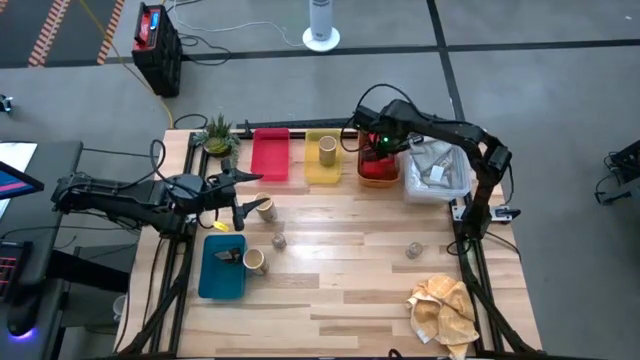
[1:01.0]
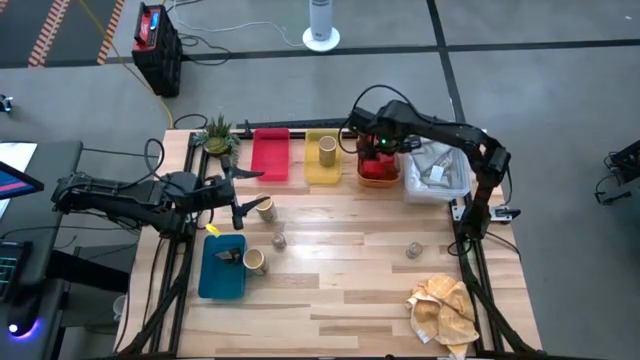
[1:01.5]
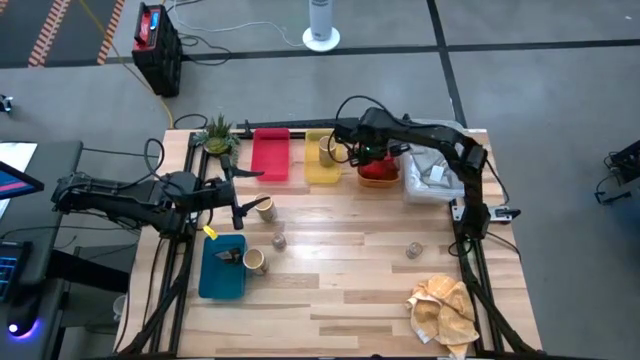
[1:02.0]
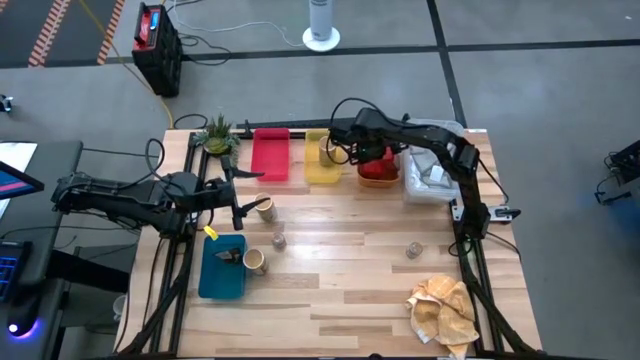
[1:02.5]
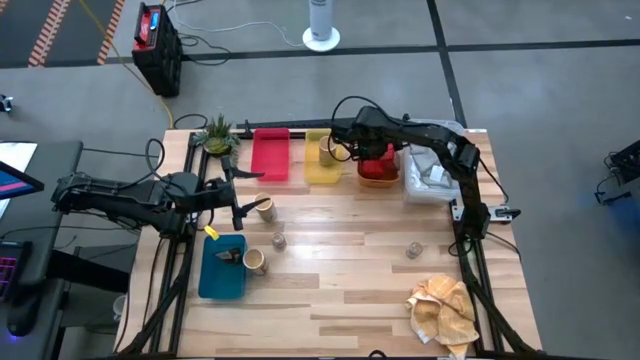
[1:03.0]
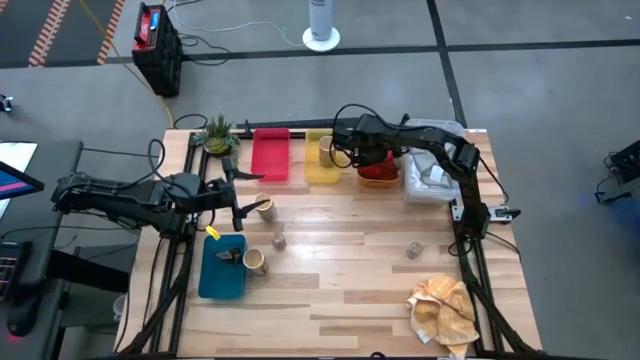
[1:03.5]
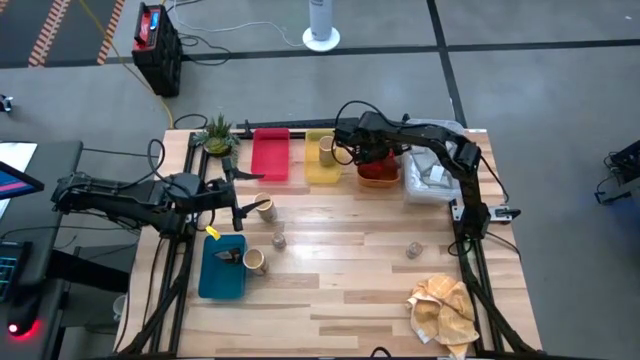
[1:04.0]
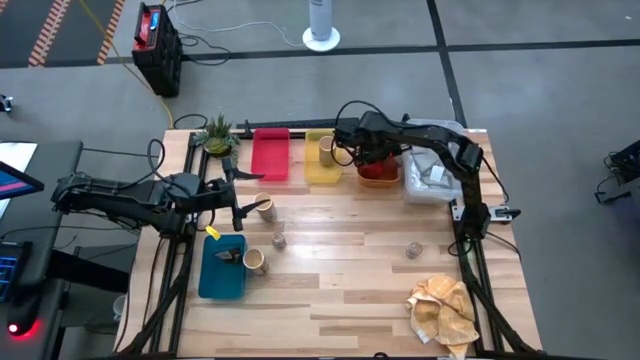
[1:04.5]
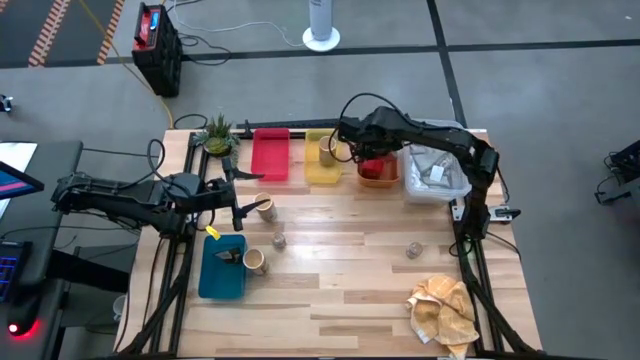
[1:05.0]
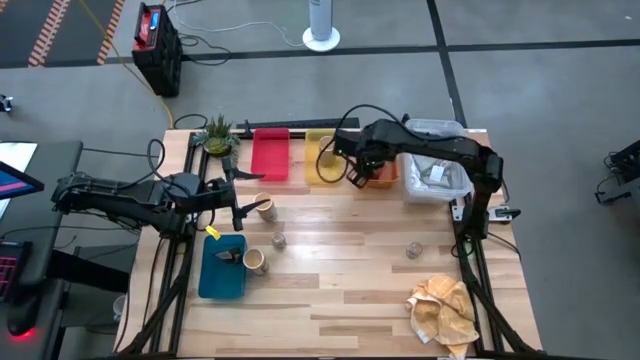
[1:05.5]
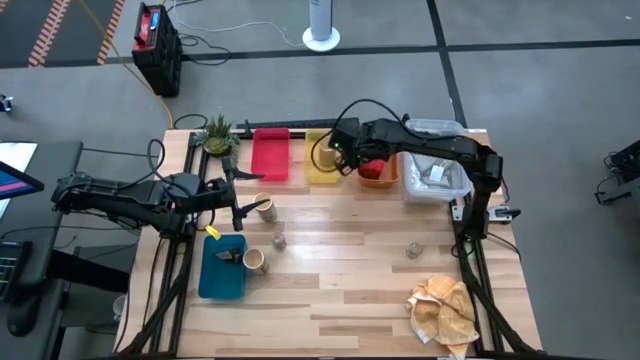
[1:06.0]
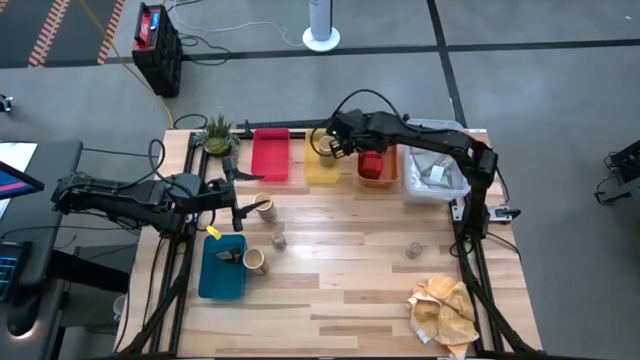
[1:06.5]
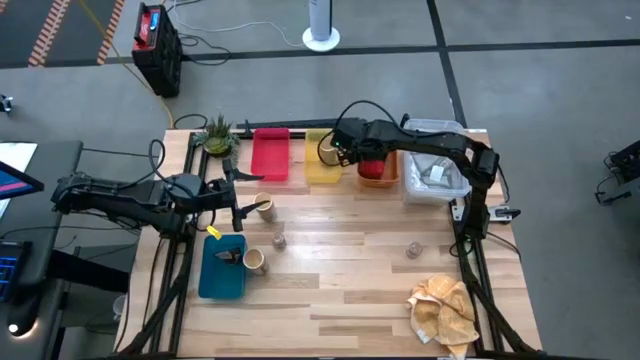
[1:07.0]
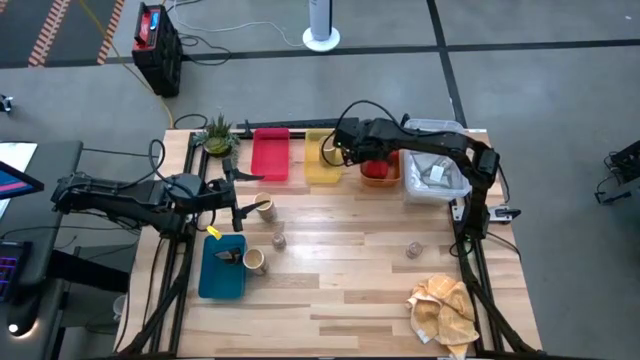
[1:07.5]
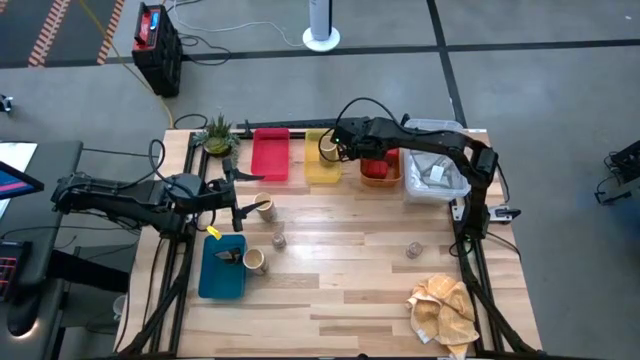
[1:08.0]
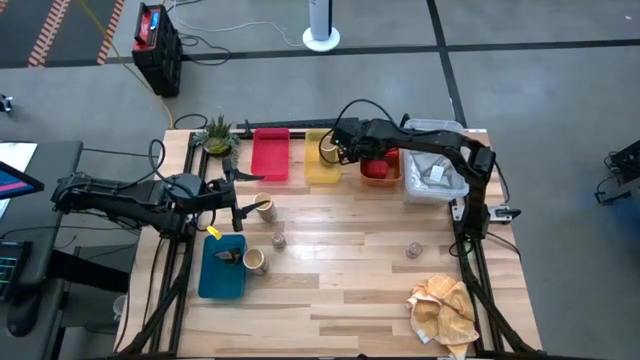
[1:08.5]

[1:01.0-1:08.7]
Task: Sort spices by type
Put the red seasoning can into the orange bin

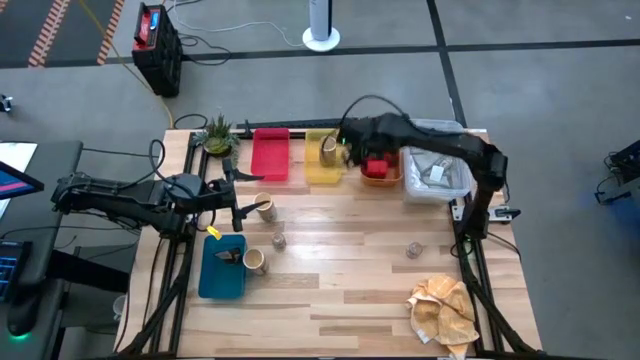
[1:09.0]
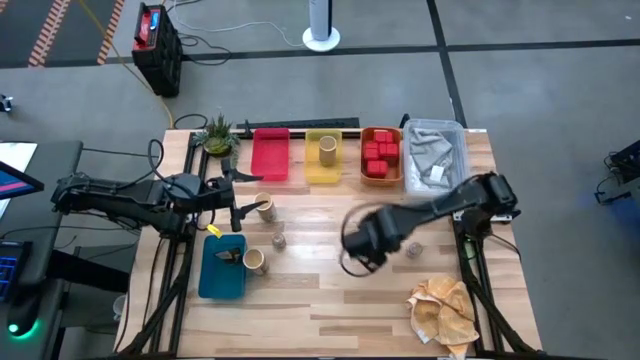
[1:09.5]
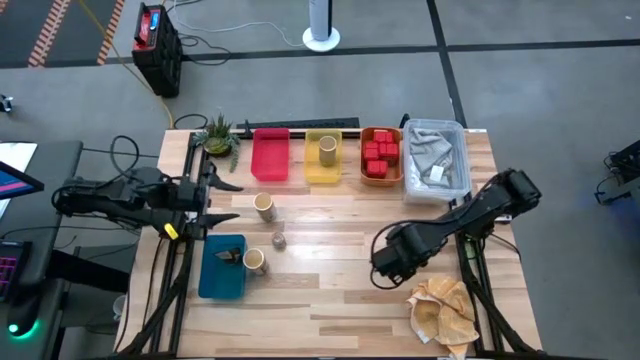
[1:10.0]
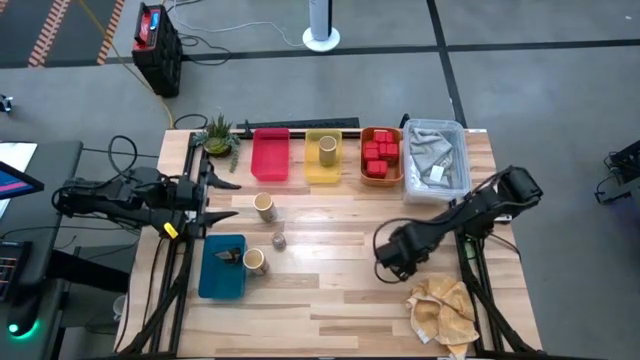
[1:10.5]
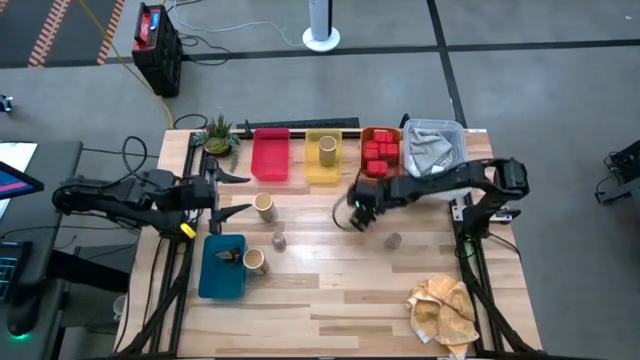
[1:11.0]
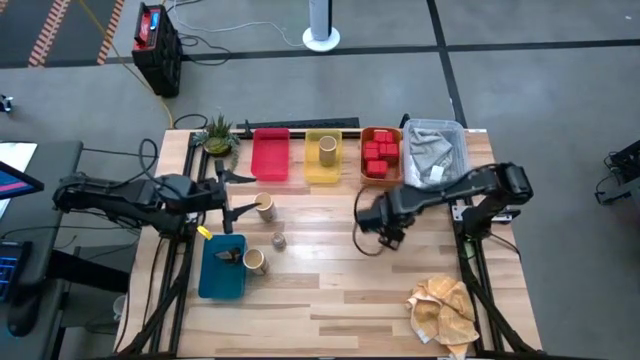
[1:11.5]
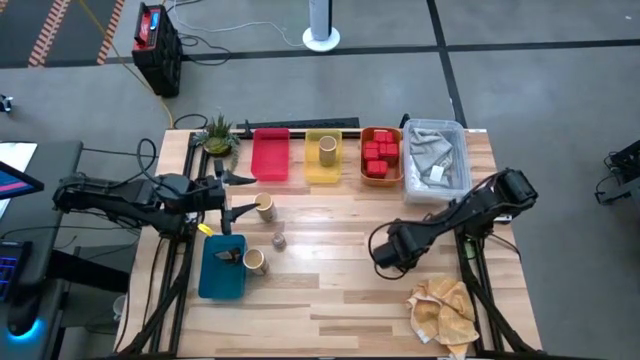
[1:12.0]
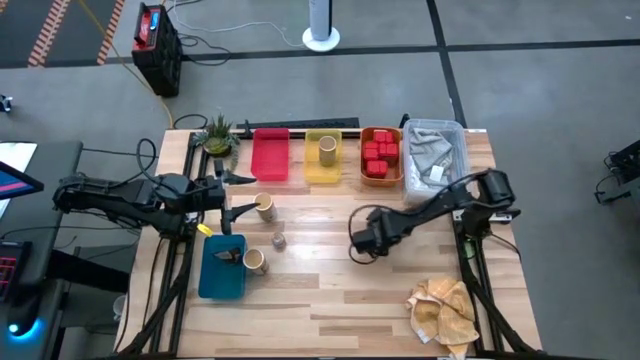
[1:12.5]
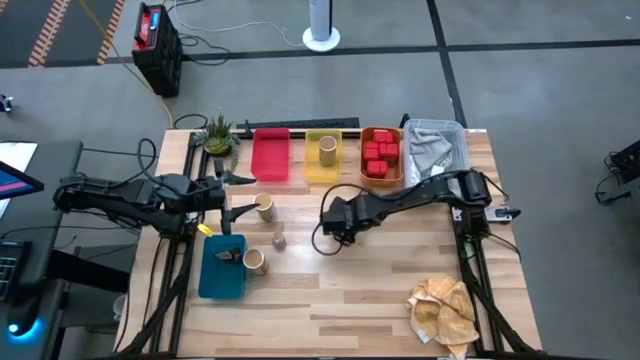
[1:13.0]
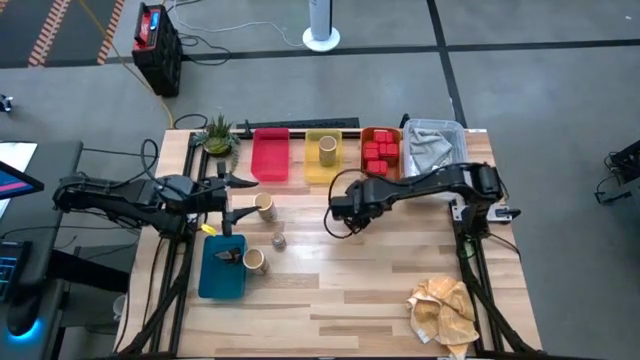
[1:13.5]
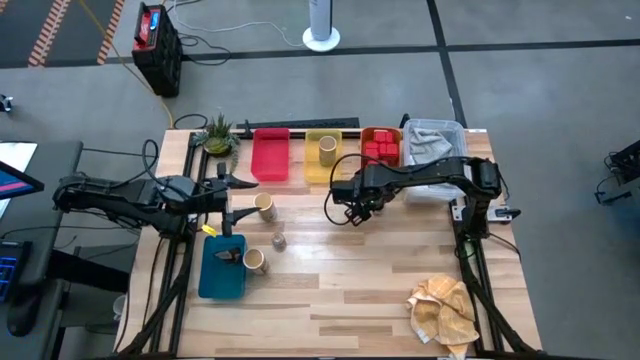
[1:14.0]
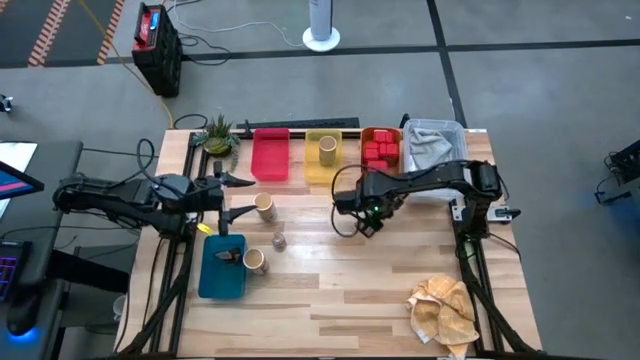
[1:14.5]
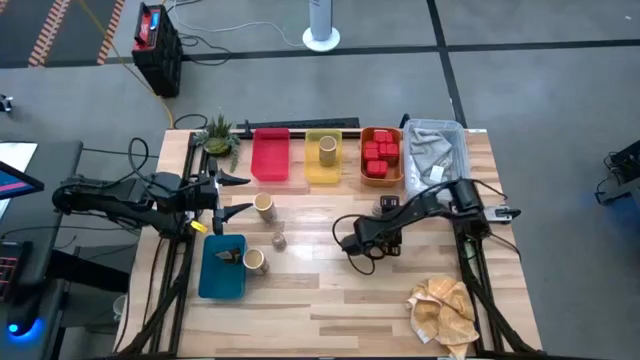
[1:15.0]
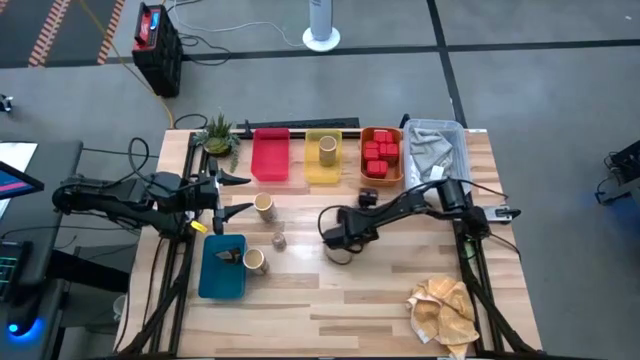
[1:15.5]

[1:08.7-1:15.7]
Move the brown seasoning bottle to the center of the table

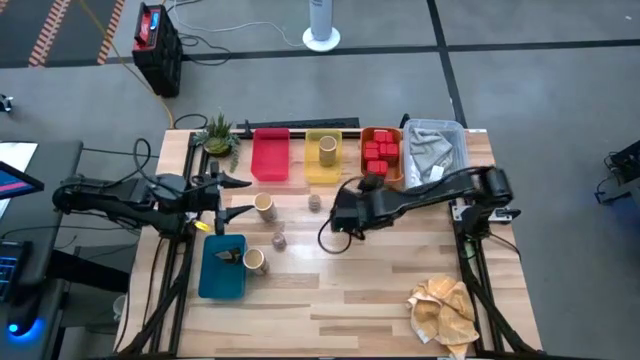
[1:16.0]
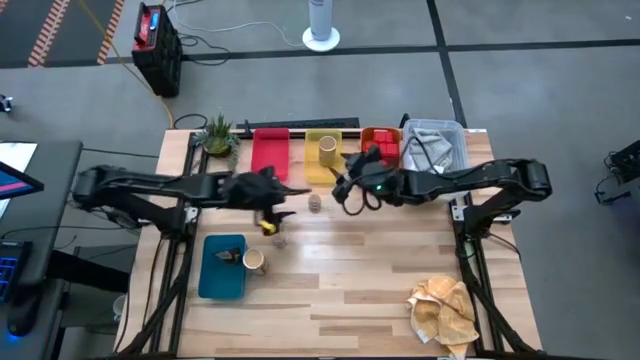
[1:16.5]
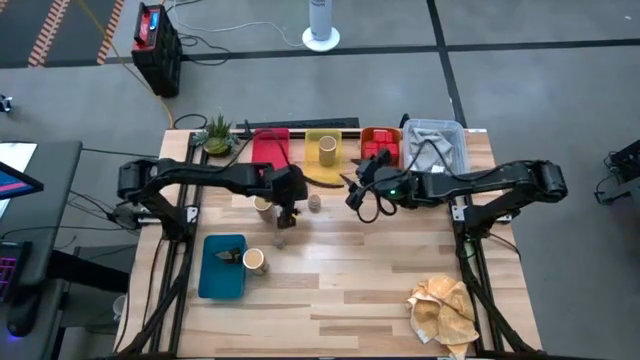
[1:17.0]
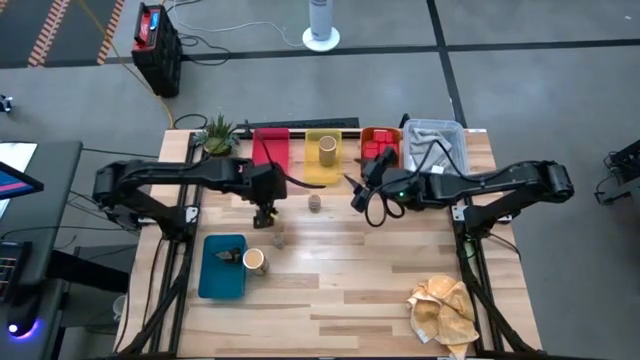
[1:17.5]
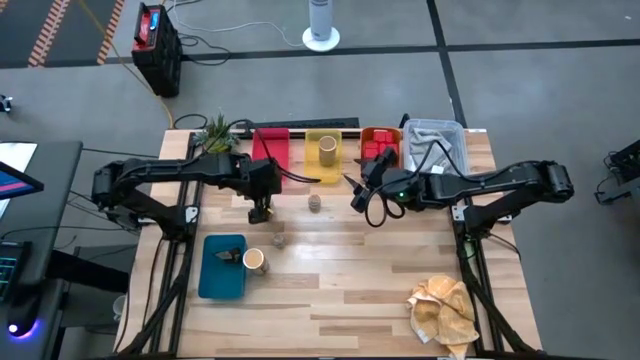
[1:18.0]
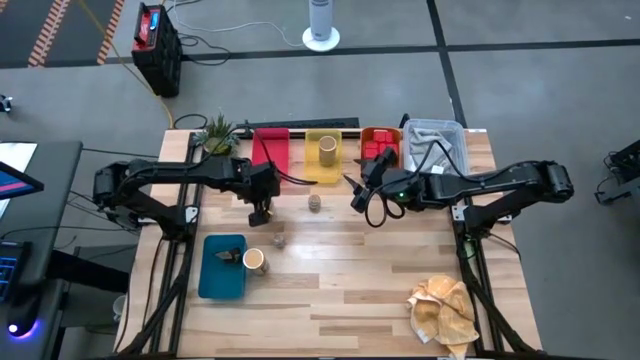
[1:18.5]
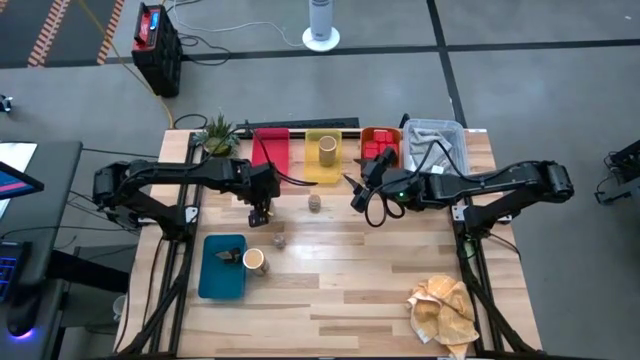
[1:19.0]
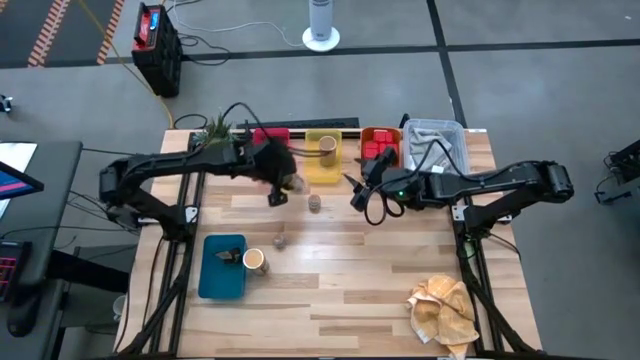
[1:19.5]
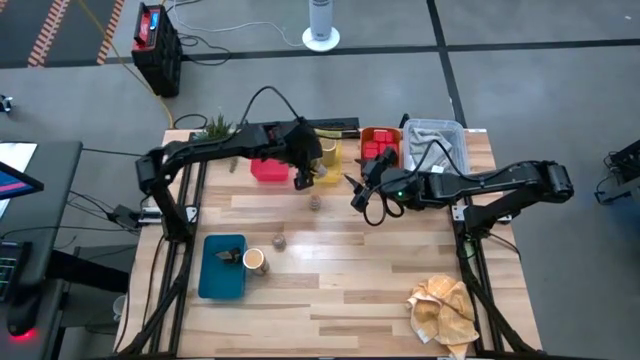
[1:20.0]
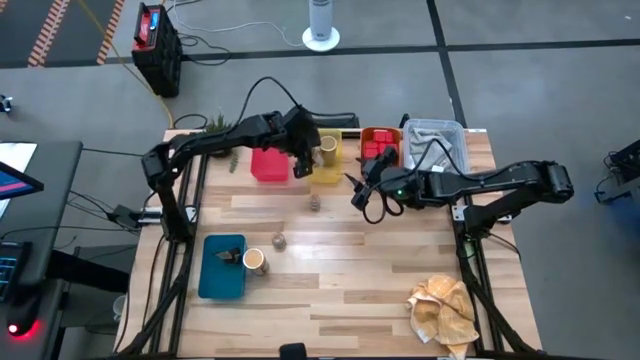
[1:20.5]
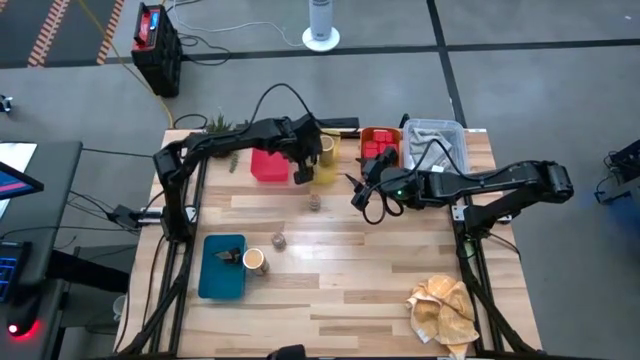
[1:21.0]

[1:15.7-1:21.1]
Put the gold seasoning bottle into the yellow bin
